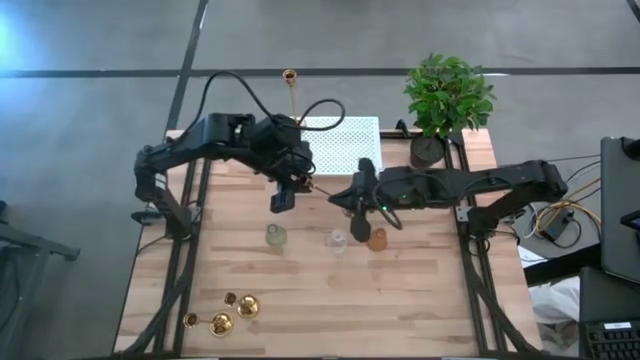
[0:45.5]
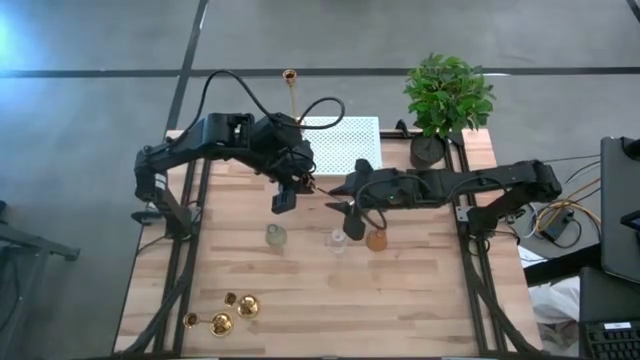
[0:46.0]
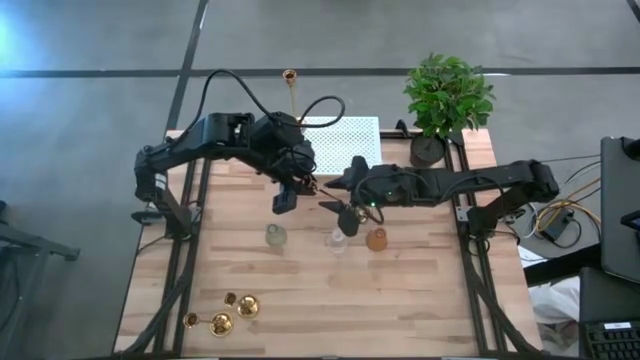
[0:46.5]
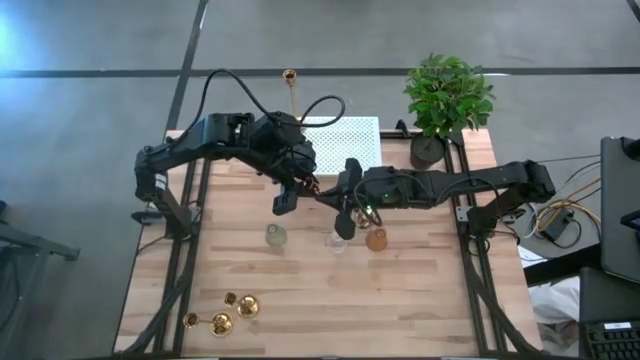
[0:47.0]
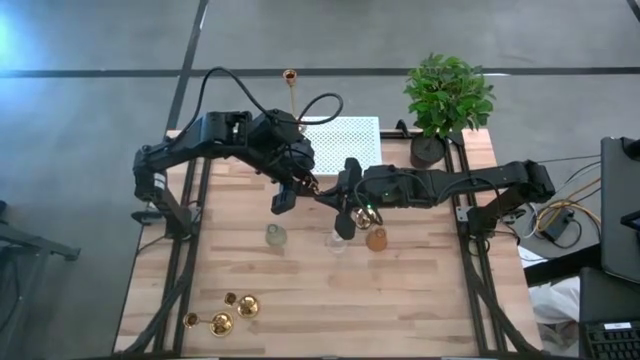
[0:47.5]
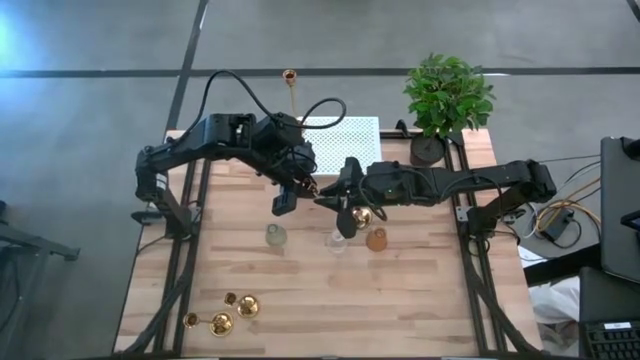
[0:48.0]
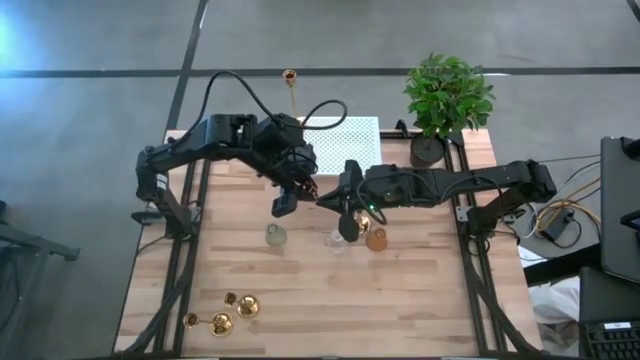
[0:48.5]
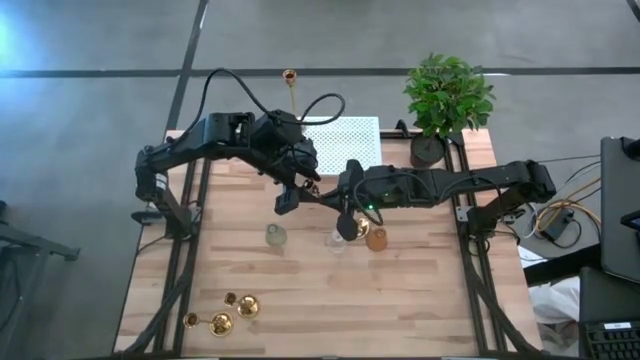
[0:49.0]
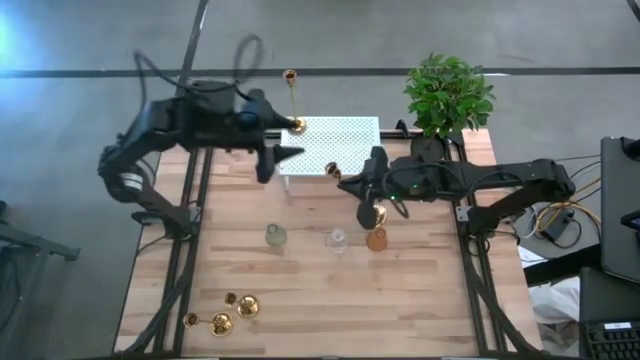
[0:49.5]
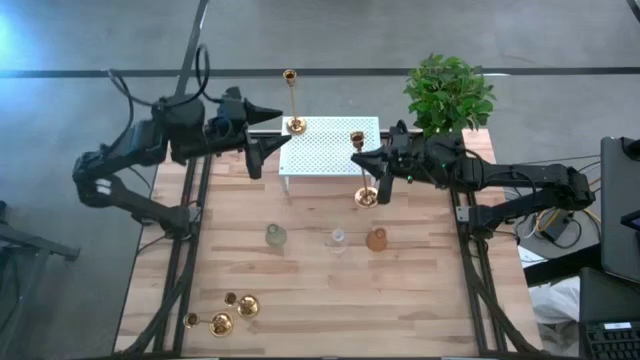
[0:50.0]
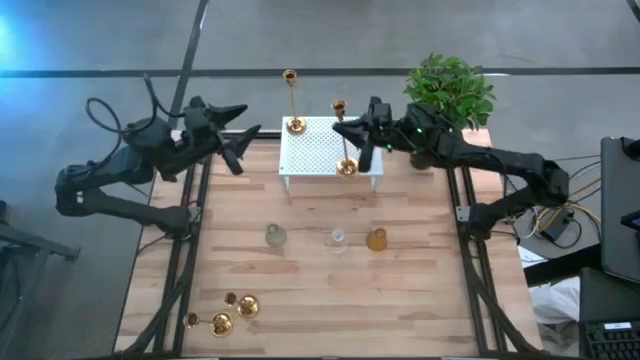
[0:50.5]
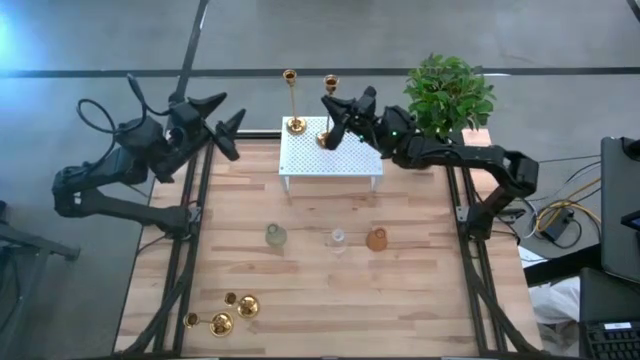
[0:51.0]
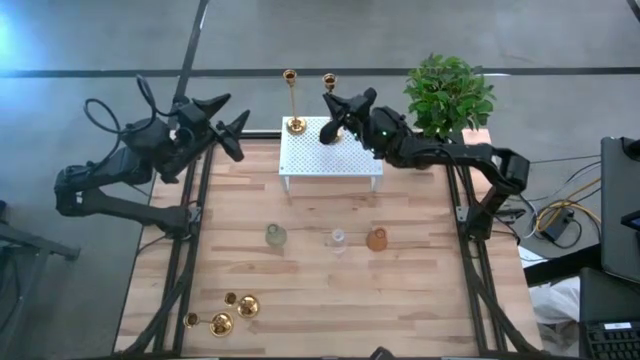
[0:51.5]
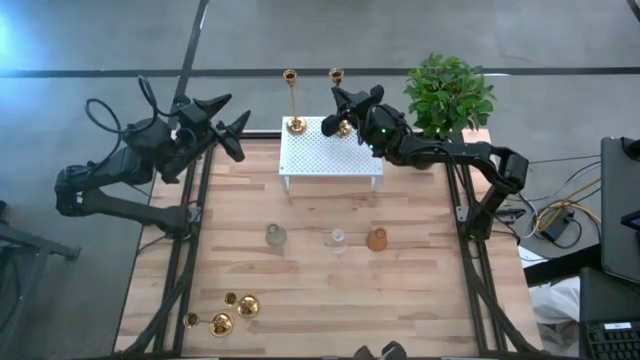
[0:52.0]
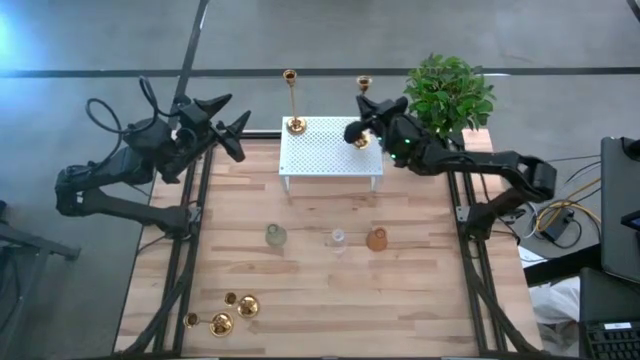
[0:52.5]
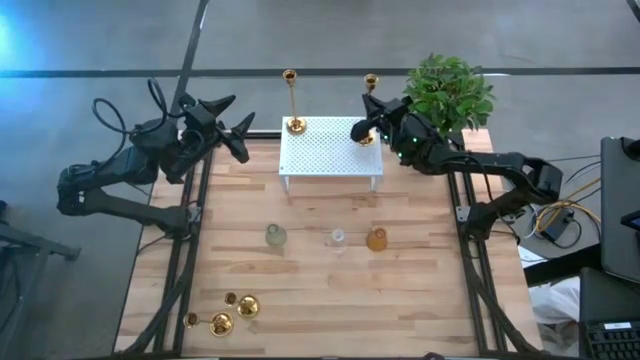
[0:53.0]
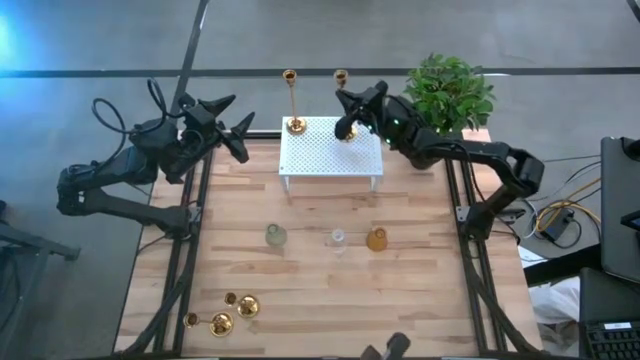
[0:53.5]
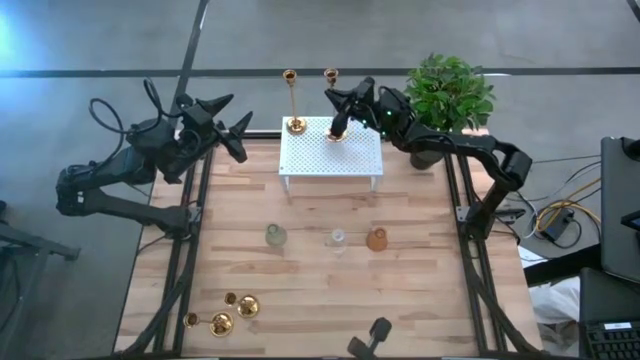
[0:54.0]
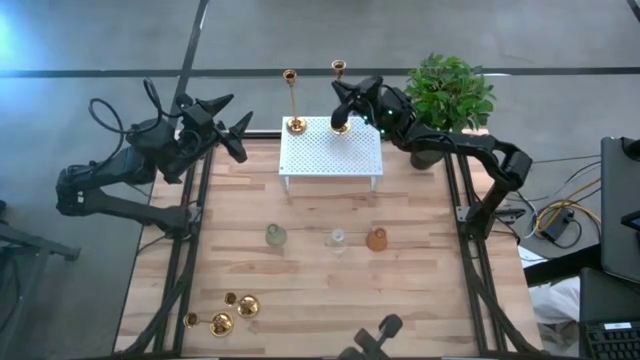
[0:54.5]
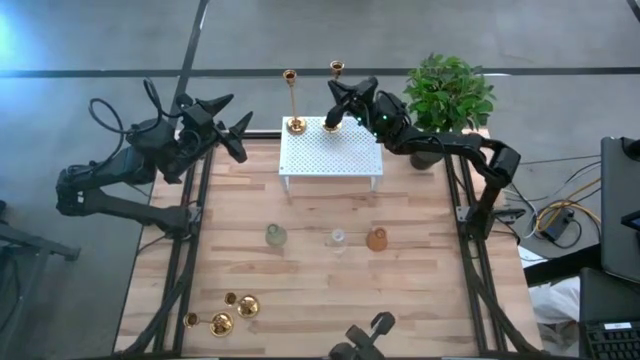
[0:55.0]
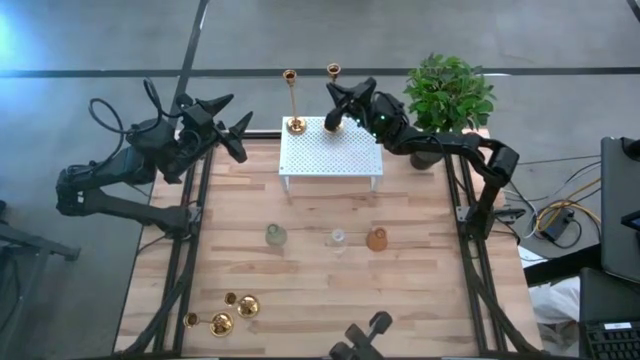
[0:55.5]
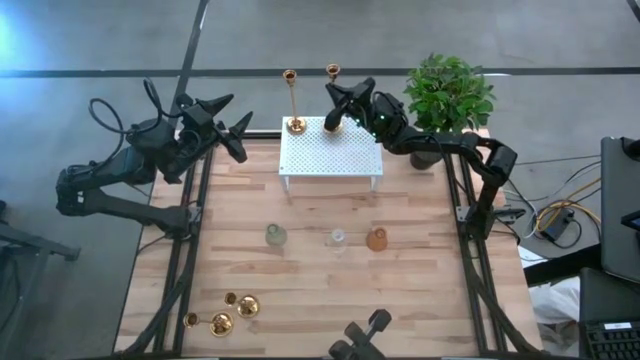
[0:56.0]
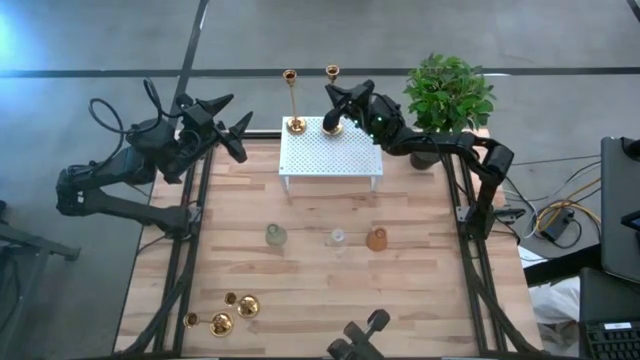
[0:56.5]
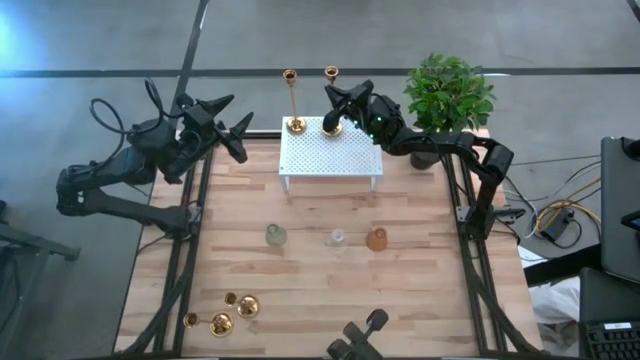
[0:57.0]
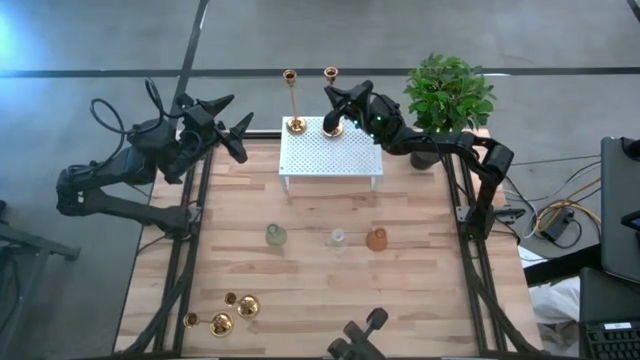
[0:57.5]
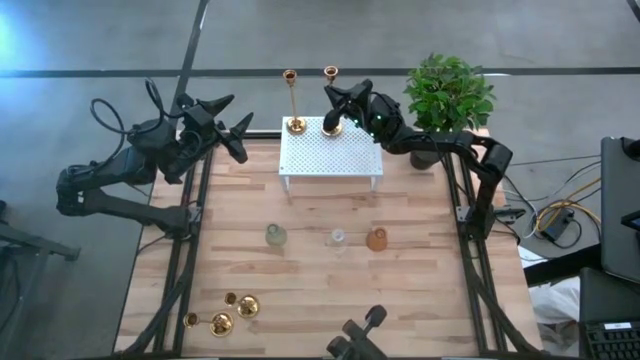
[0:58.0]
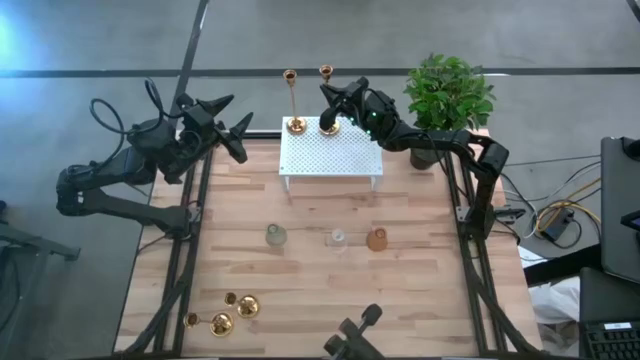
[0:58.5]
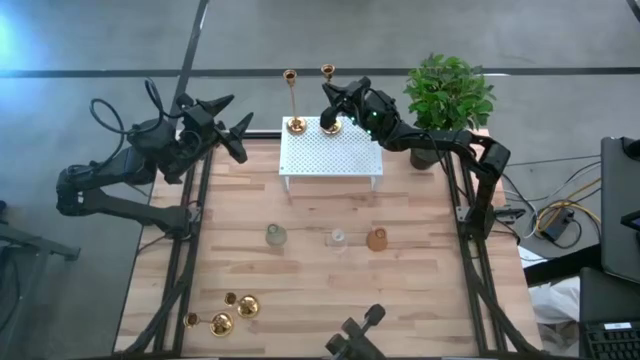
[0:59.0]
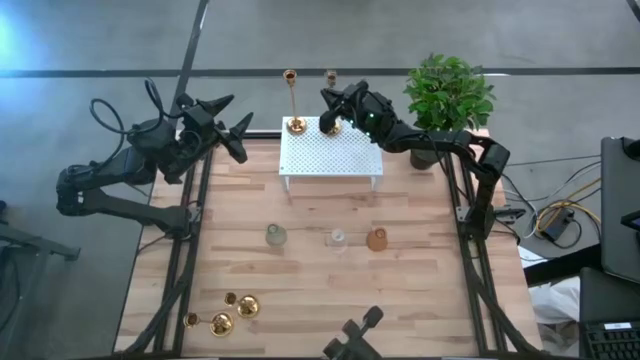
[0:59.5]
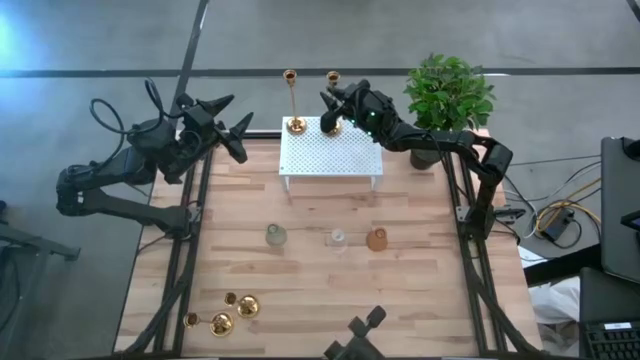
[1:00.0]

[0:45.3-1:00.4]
Task: Pick & Place candle stick holders
Align the gold candle holder with the other gold candle holder on the shelf

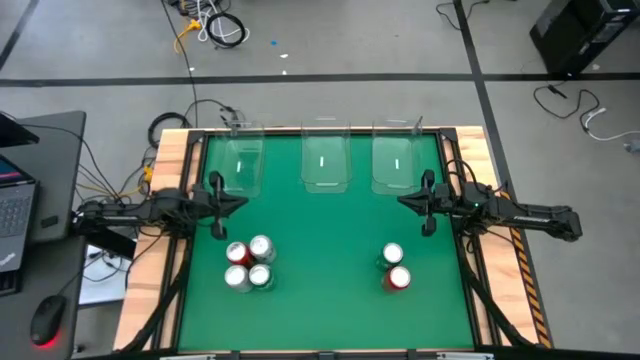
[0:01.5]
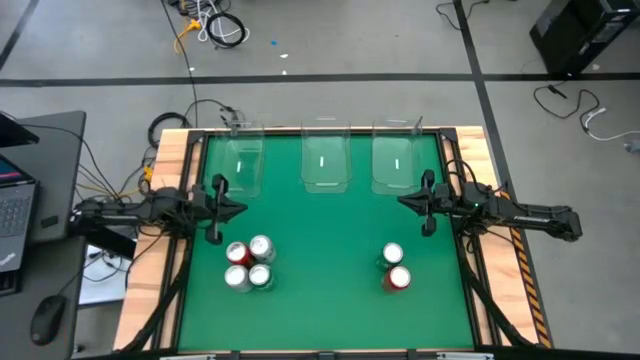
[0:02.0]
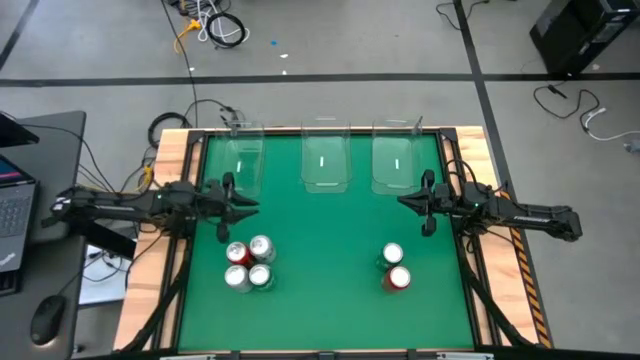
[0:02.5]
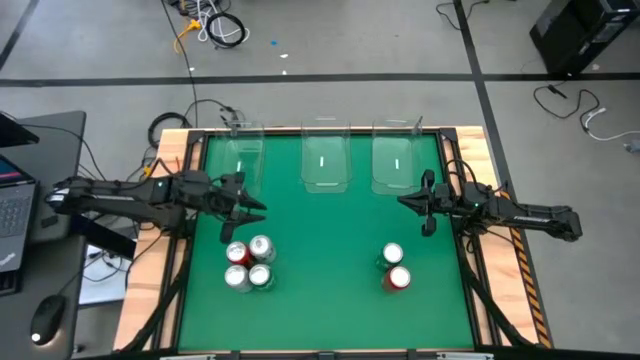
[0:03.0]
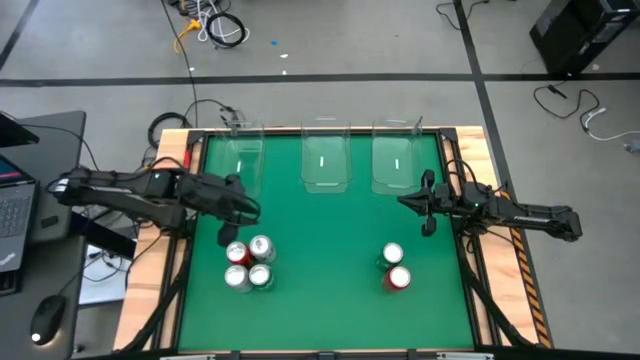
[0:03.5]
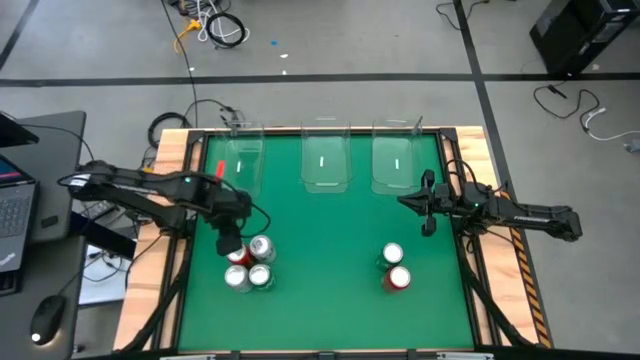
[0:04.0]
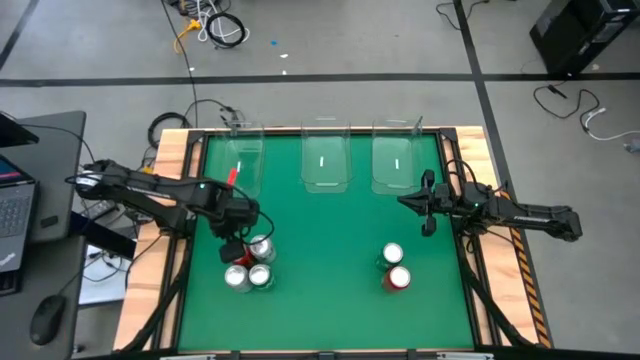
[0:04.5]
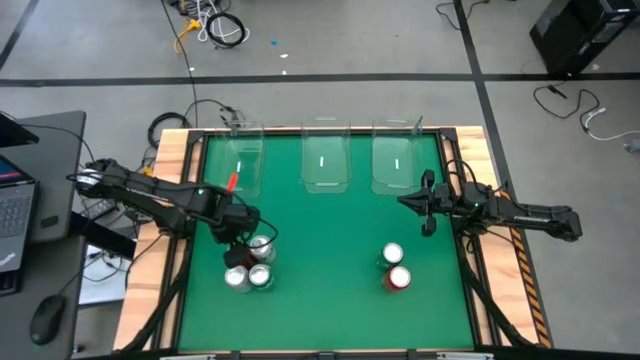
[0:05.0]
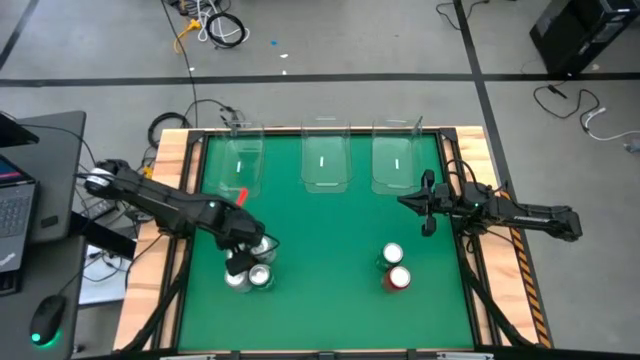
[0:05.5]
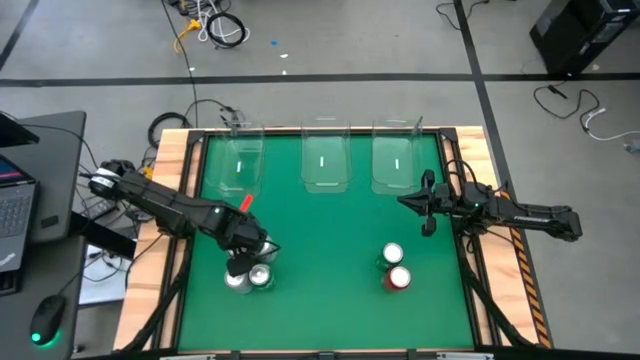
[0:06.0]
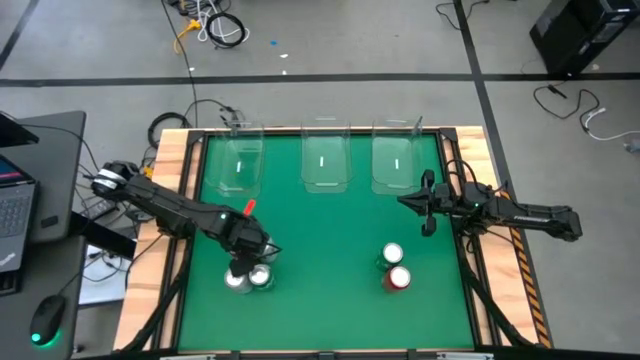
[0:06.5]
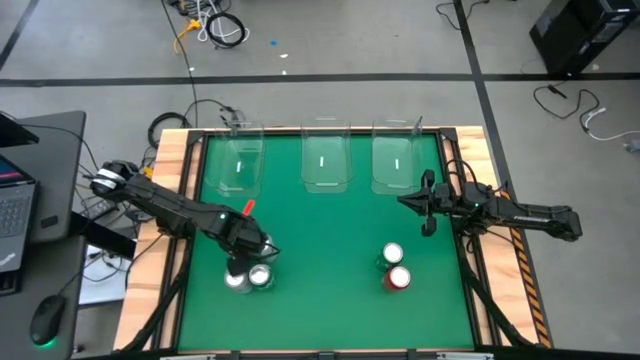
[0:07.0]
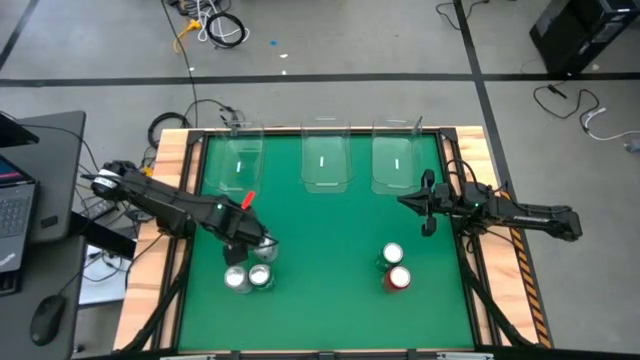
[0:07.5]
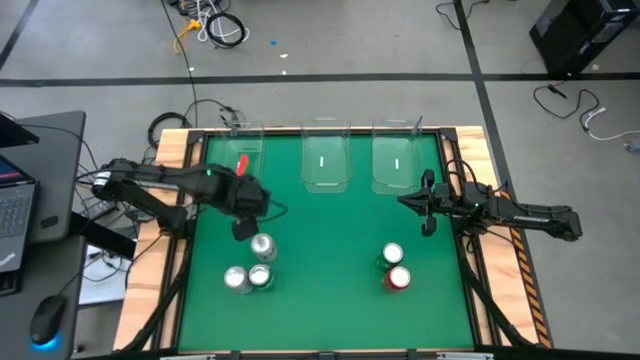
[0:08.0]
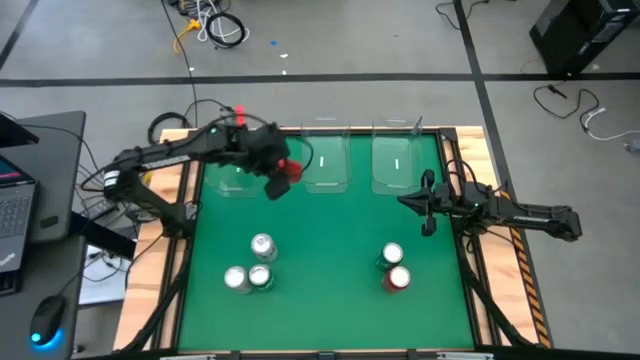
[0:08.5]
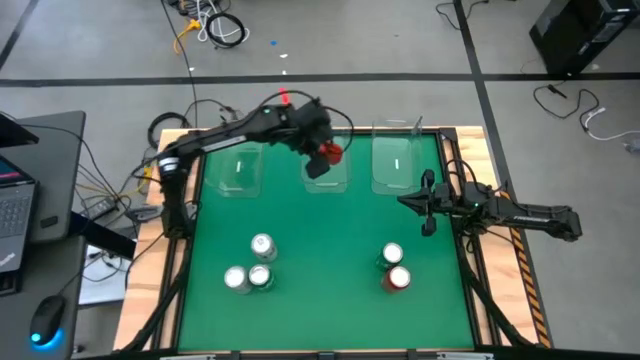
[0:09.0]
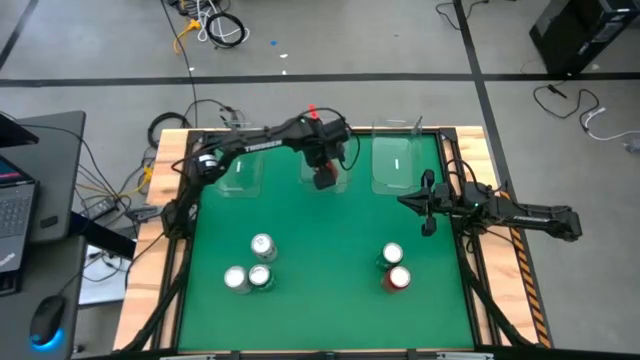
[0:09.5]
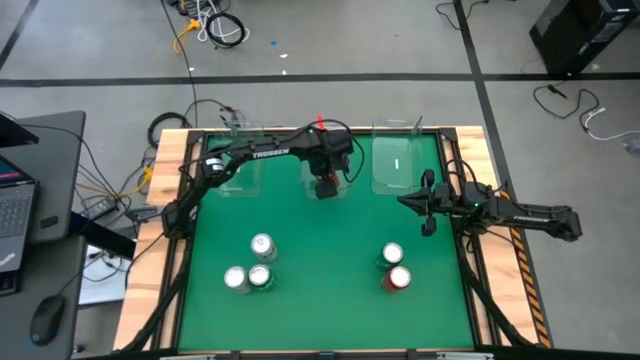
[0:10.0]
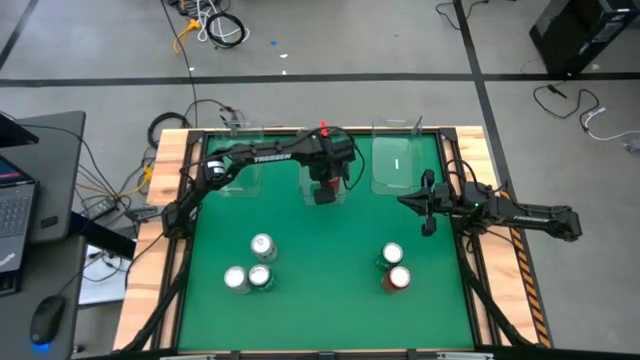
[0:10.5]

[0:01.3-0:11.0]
Task: Sort soda cans
Put the left red-black soda can into the center transparent bin
